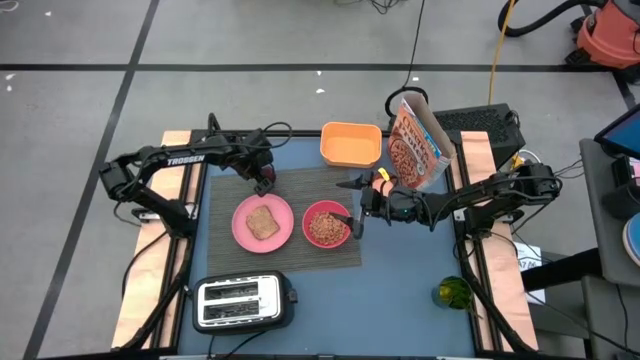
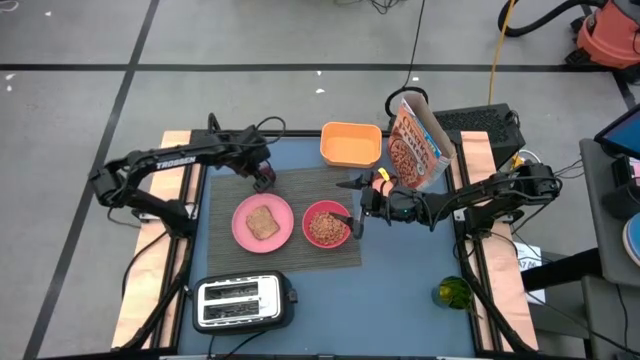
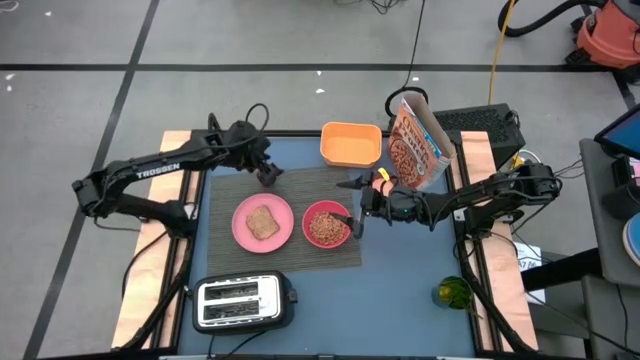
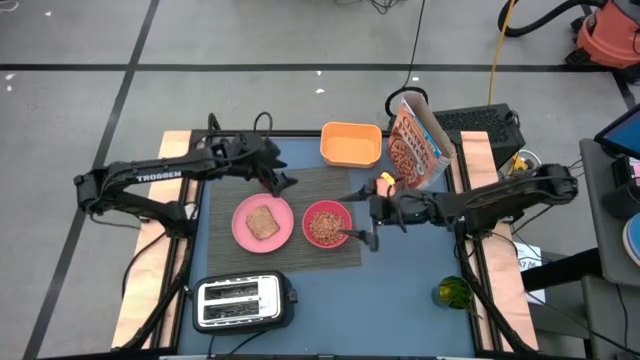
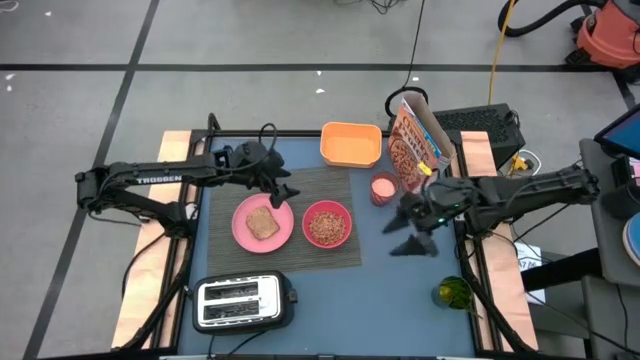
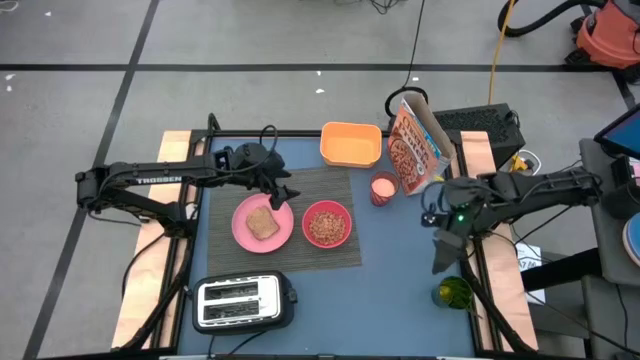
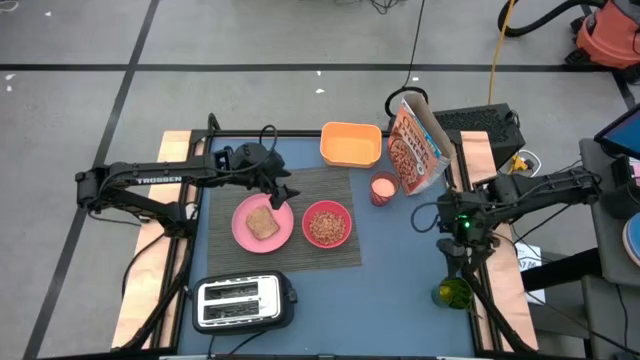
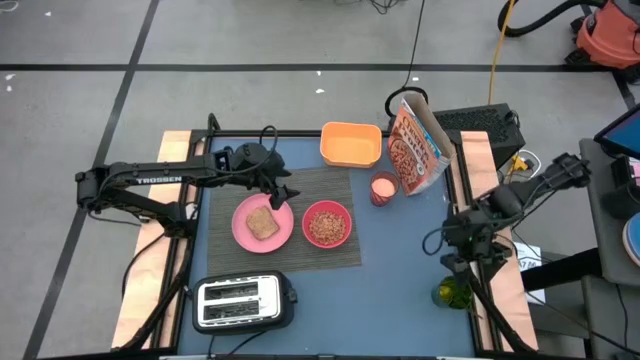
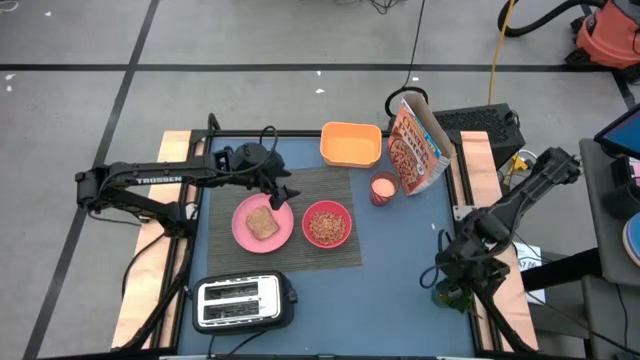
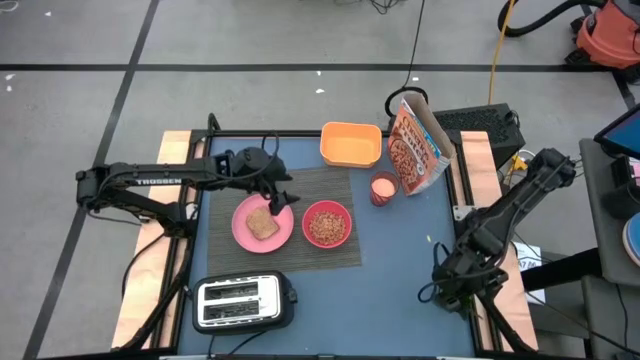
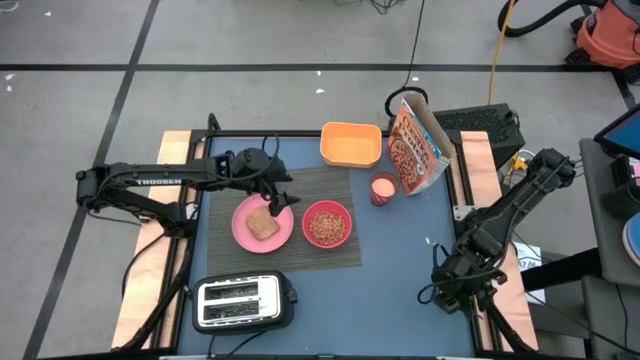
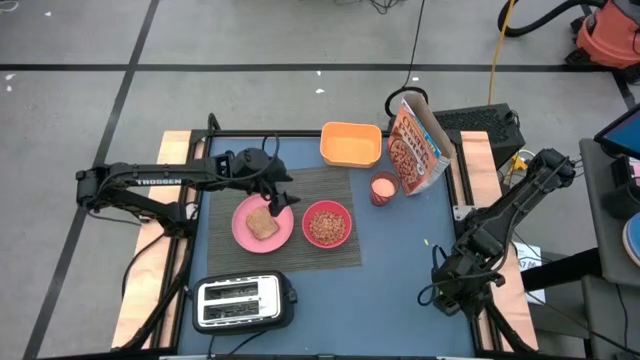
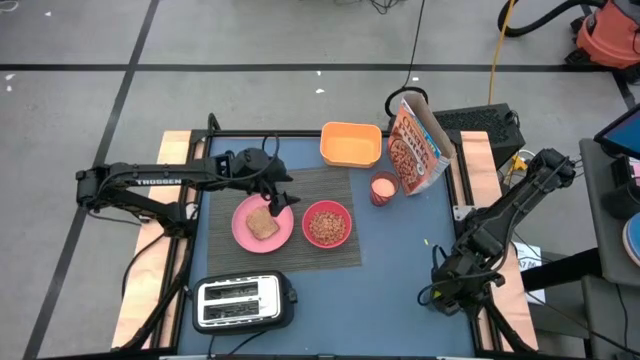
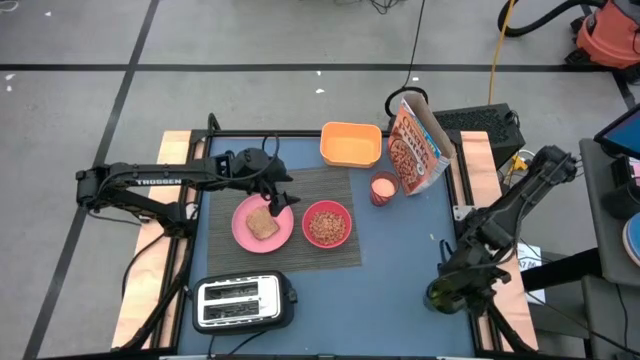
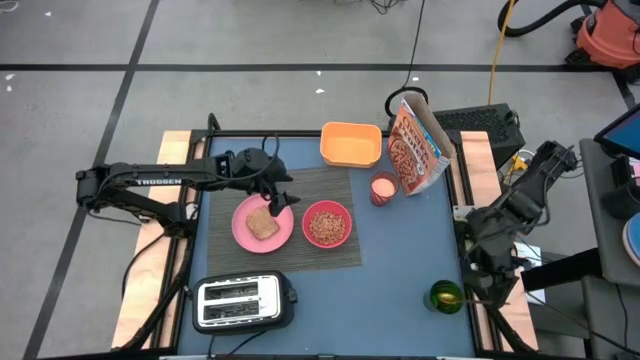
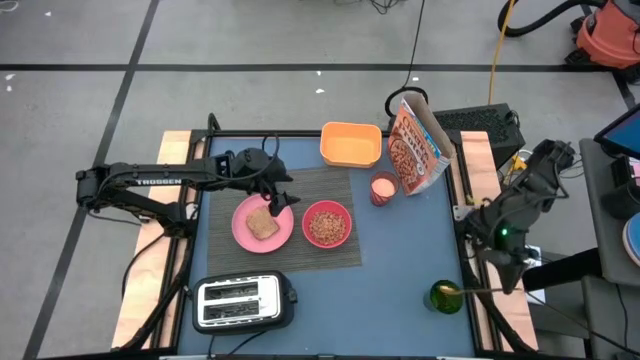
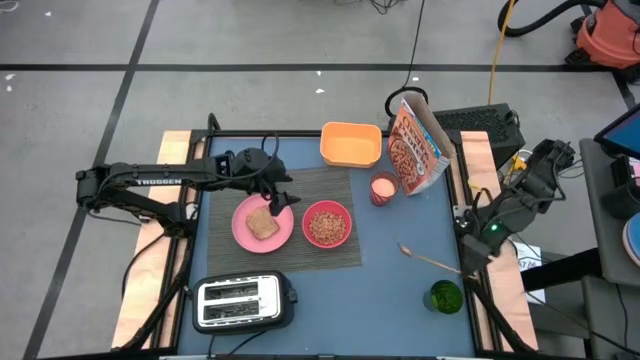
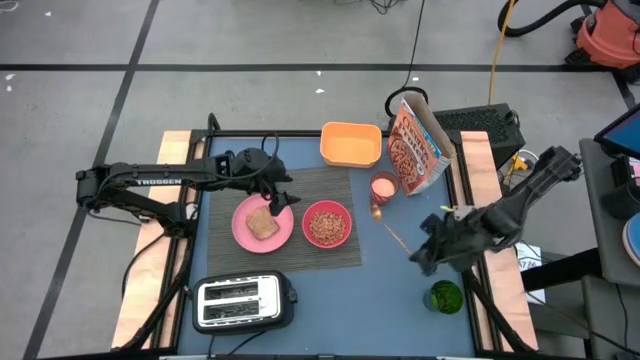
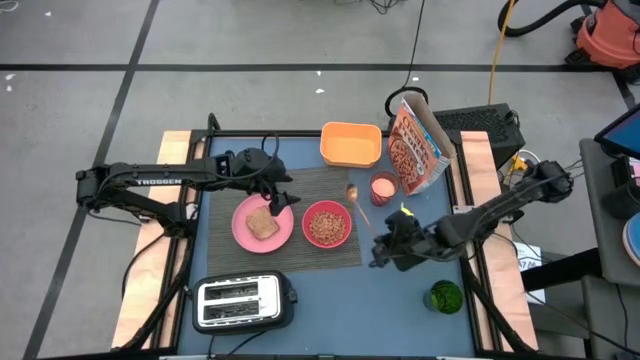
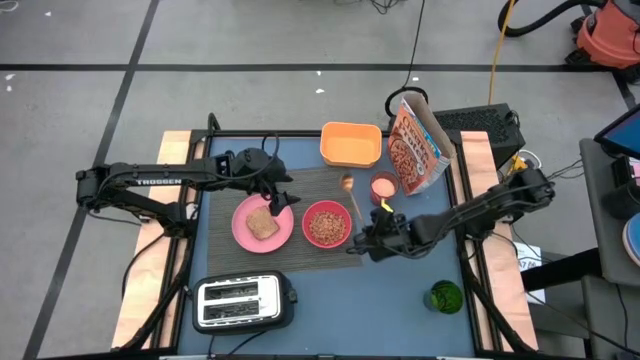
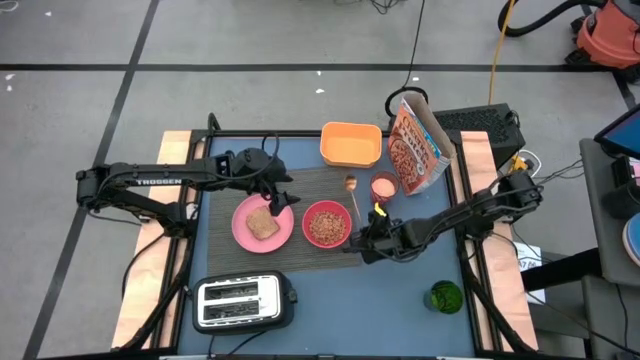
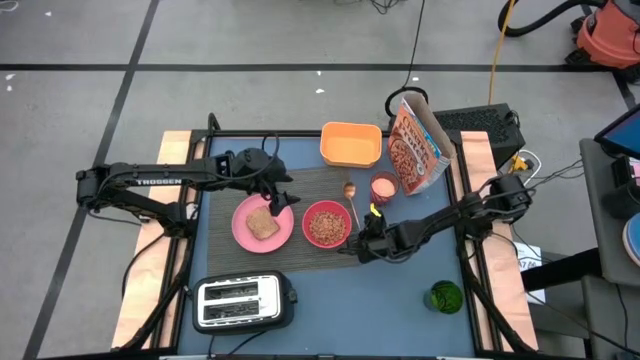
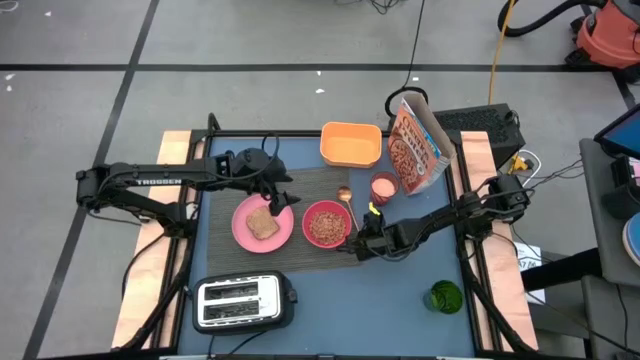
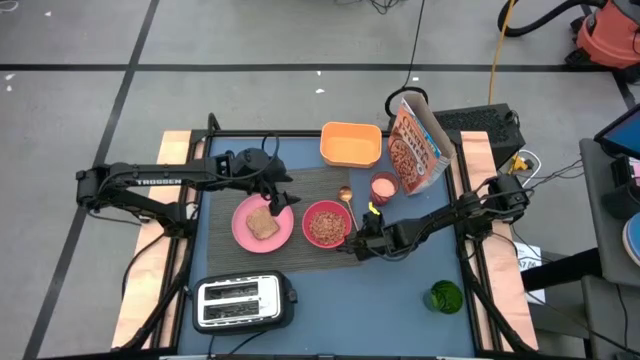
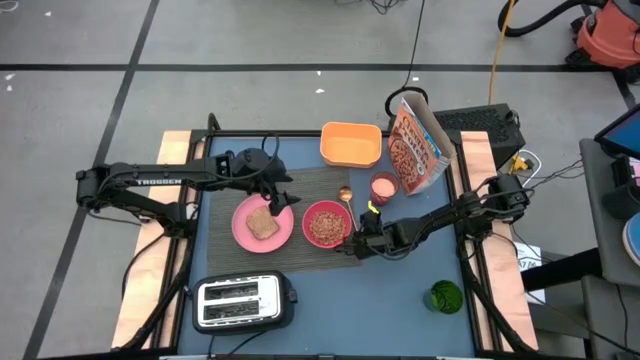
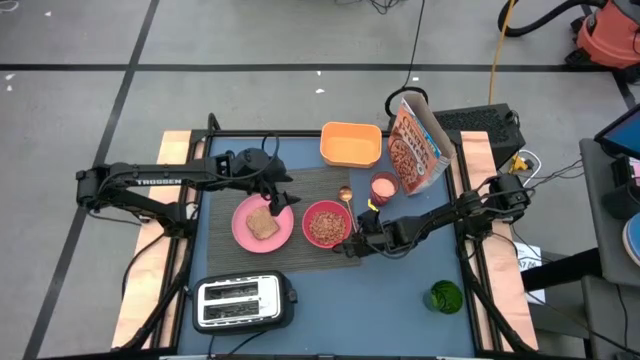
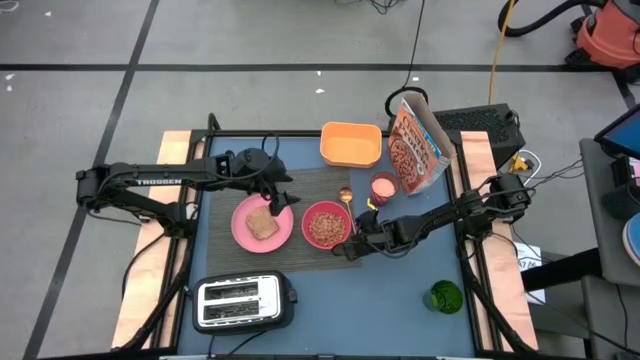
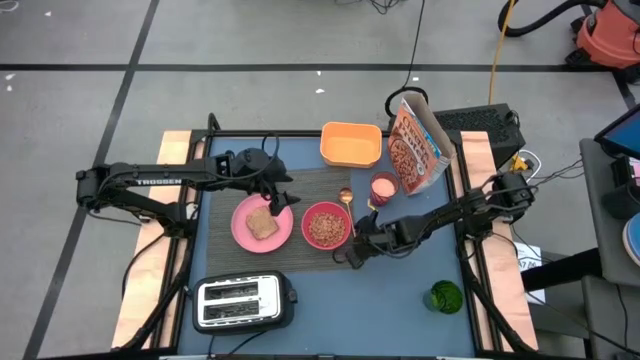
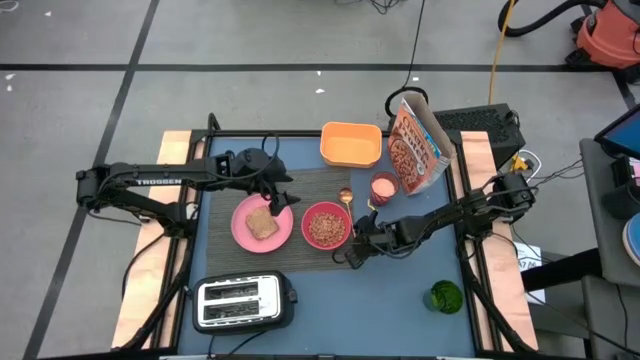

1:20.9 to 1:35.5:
Task: Arrange a breakfast setting
Put the gold spoon on the gray table mat to the right of the dark pink bowl

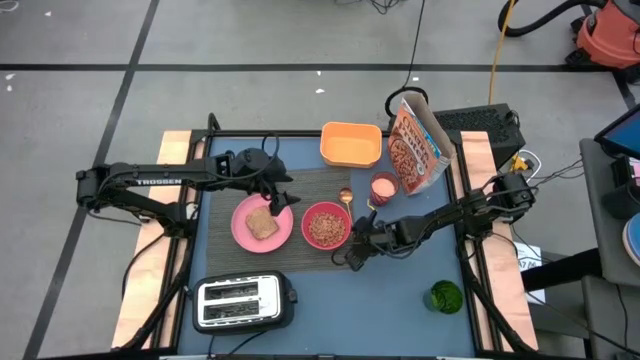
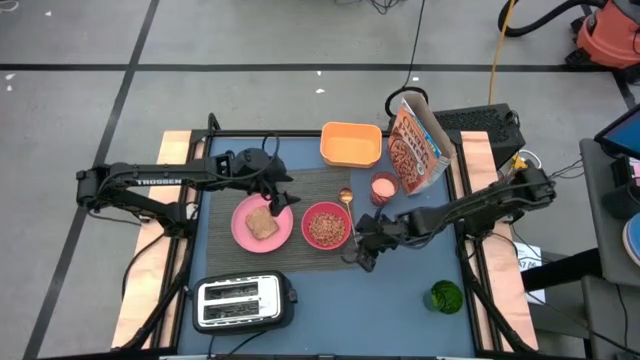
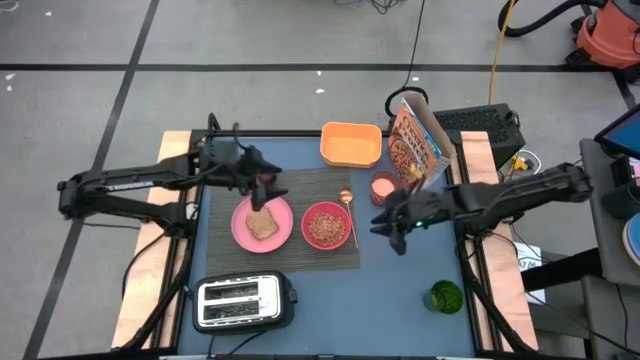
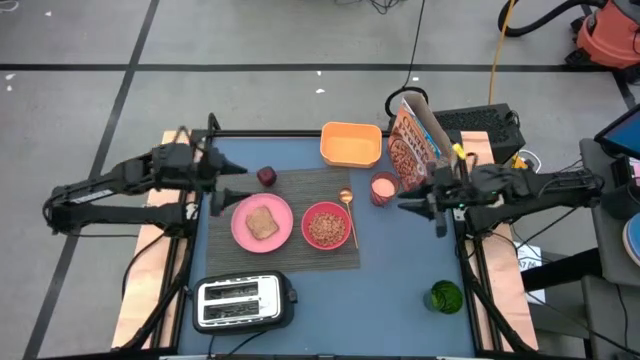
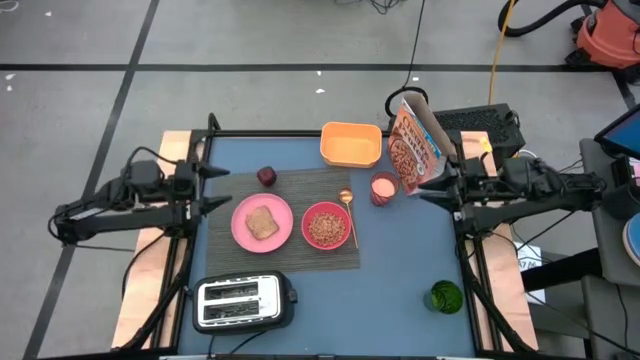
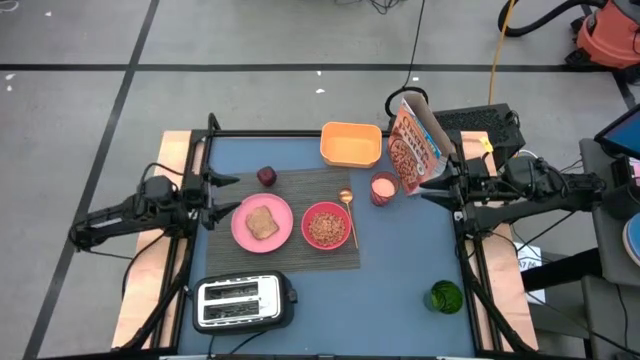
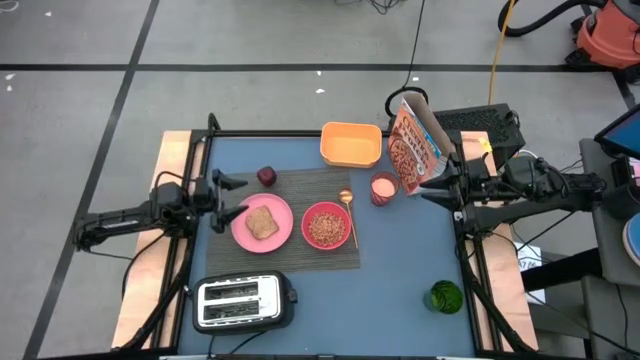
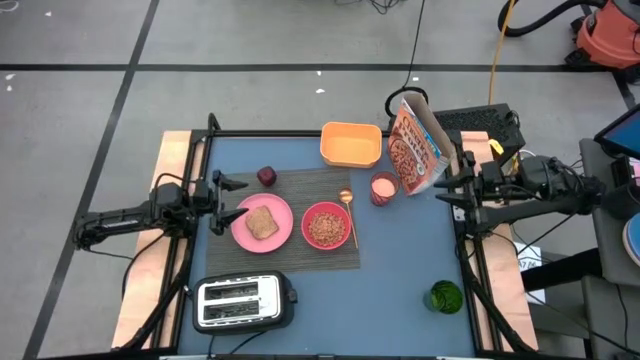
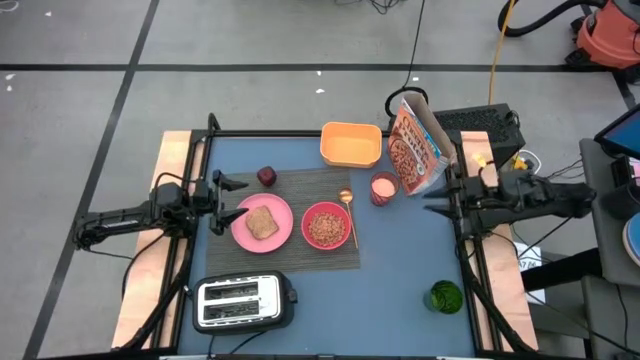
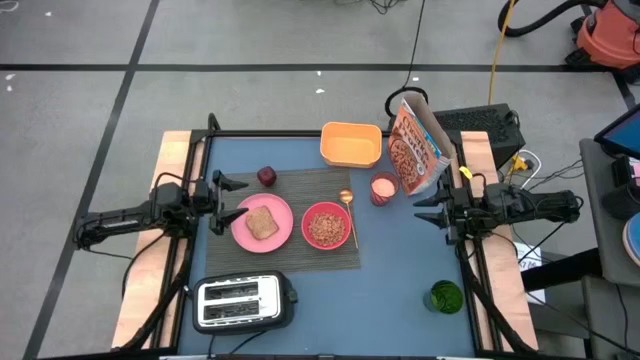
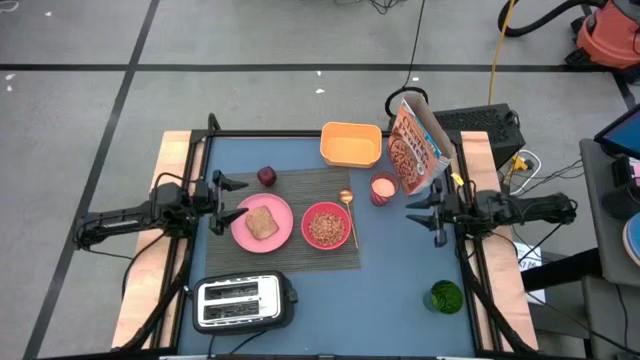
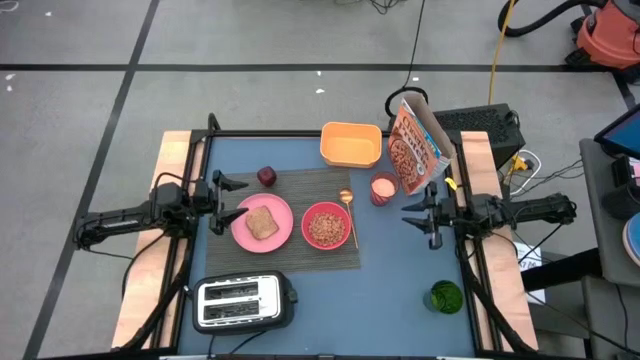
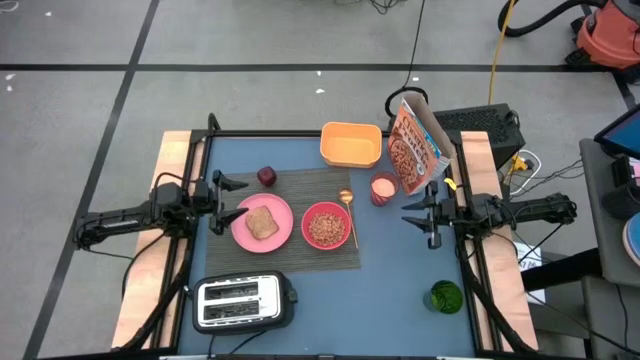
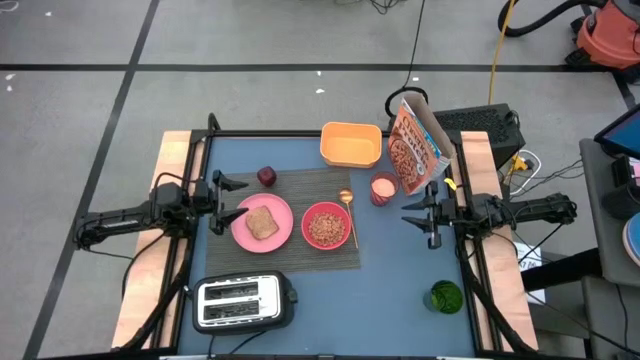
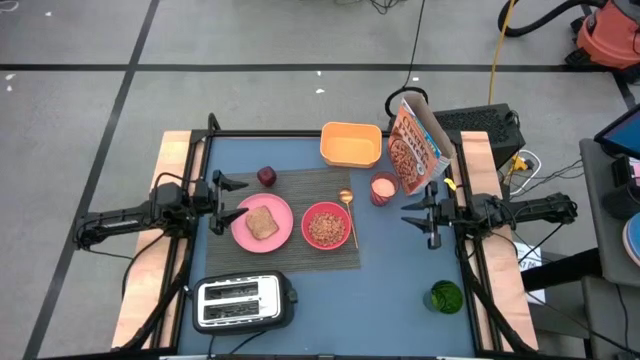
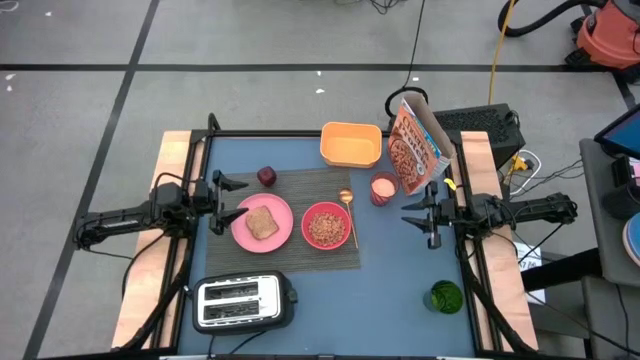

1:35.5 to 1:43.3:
Return to Home Position
